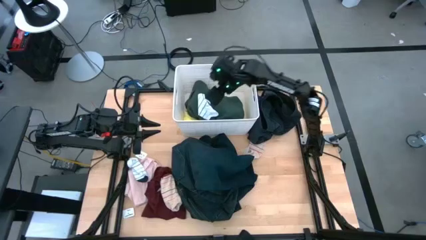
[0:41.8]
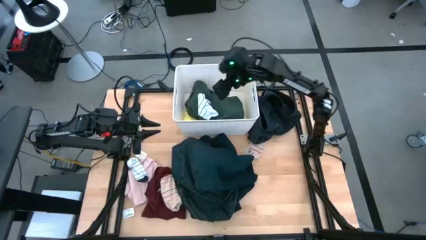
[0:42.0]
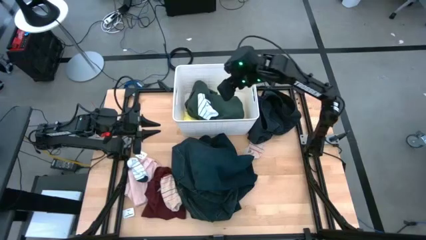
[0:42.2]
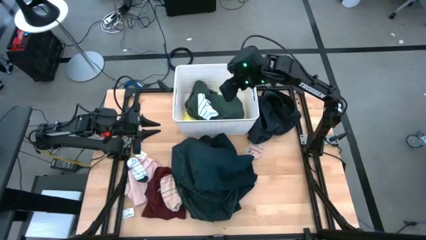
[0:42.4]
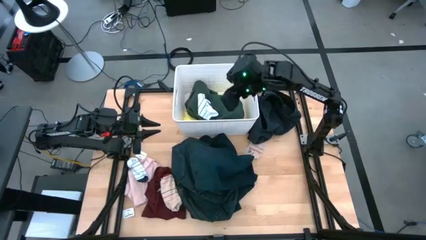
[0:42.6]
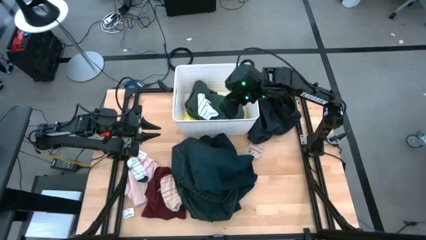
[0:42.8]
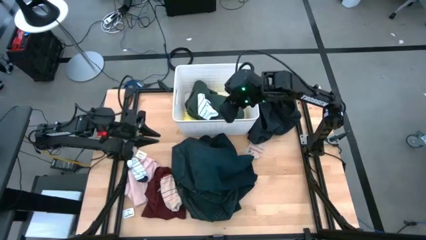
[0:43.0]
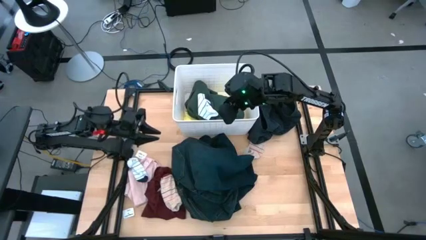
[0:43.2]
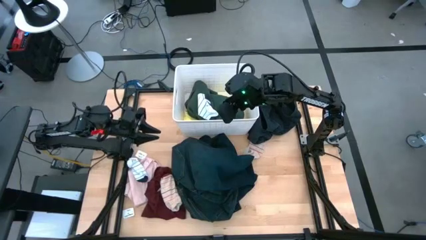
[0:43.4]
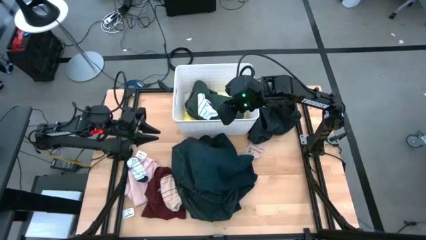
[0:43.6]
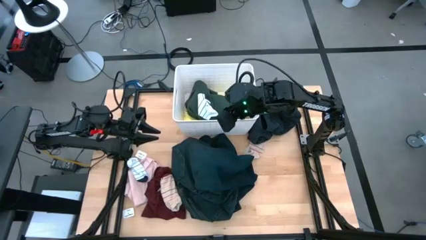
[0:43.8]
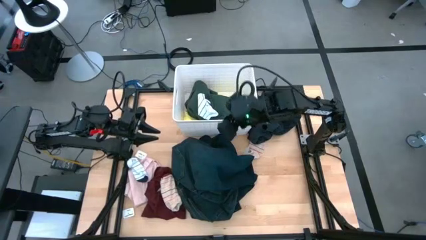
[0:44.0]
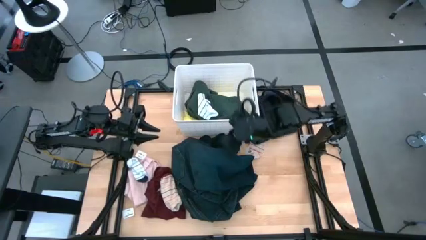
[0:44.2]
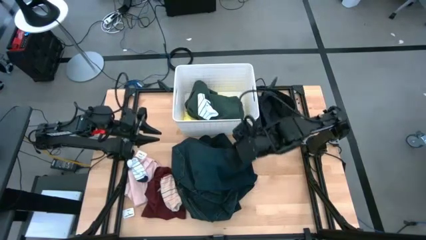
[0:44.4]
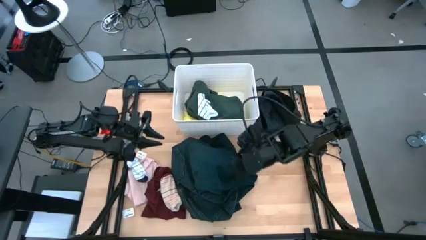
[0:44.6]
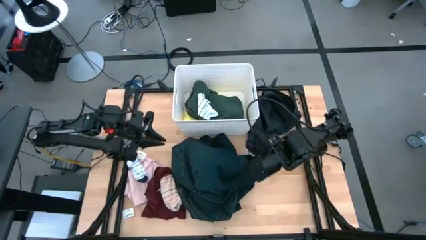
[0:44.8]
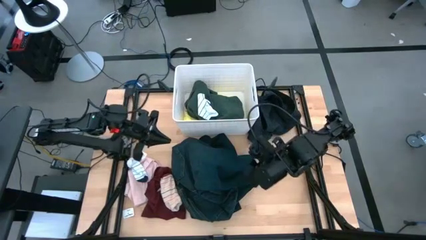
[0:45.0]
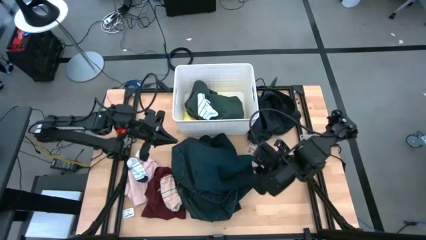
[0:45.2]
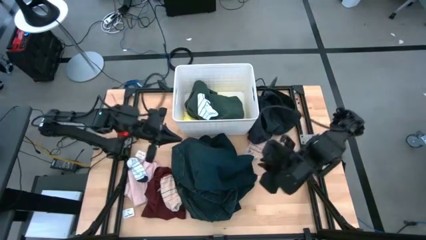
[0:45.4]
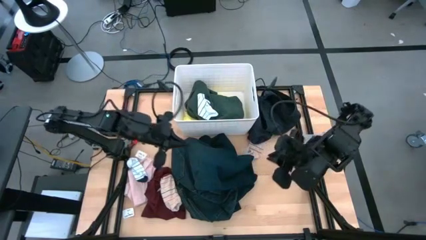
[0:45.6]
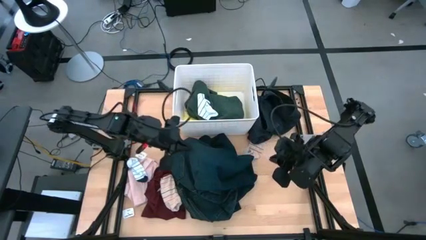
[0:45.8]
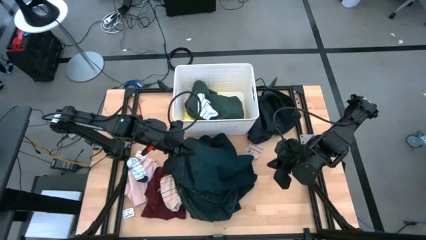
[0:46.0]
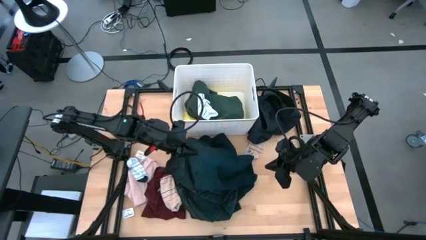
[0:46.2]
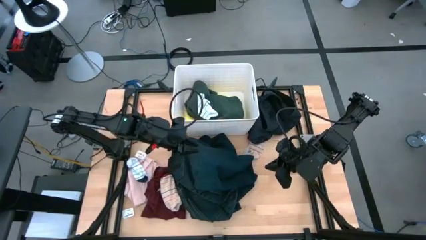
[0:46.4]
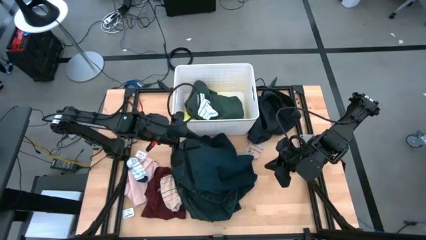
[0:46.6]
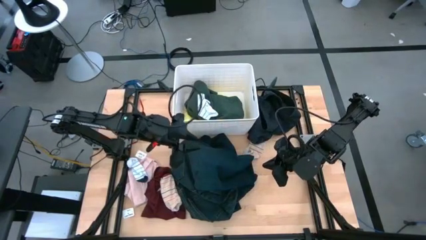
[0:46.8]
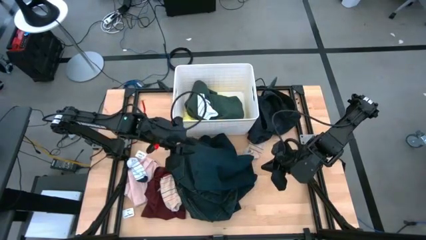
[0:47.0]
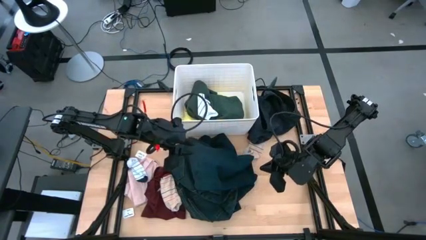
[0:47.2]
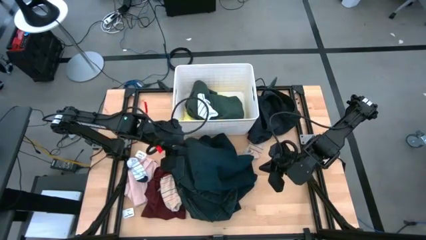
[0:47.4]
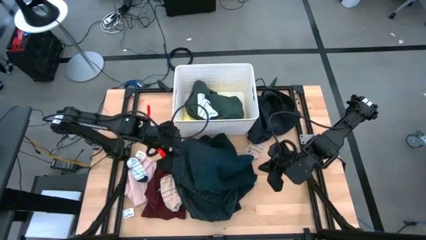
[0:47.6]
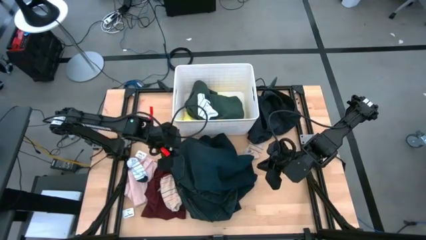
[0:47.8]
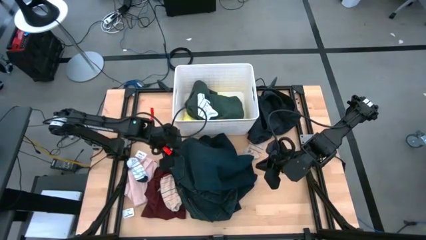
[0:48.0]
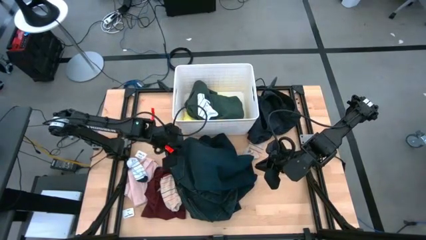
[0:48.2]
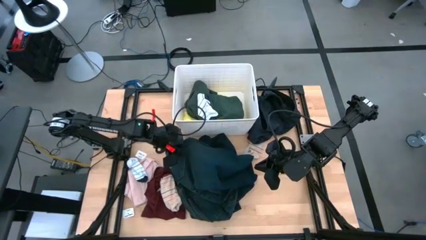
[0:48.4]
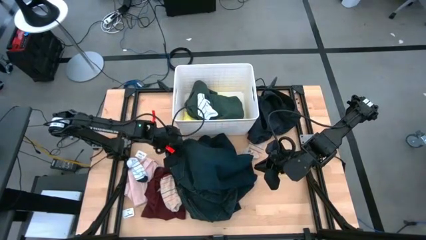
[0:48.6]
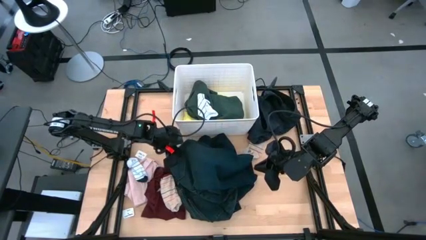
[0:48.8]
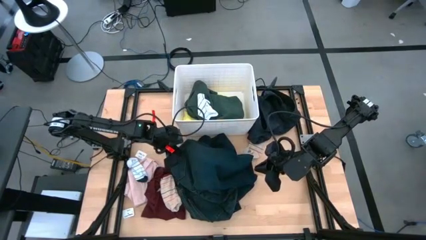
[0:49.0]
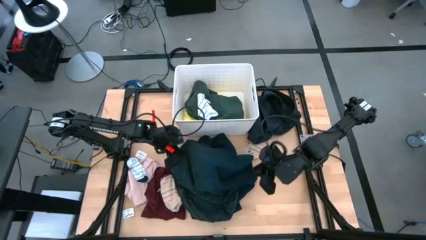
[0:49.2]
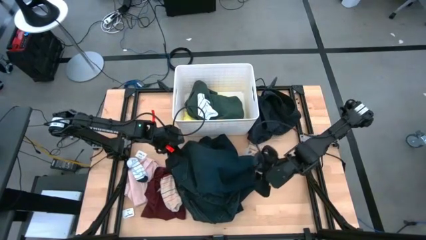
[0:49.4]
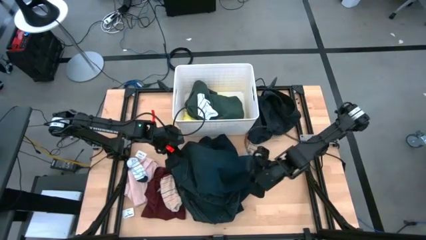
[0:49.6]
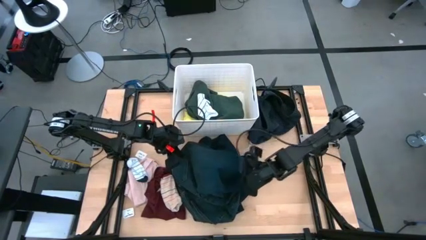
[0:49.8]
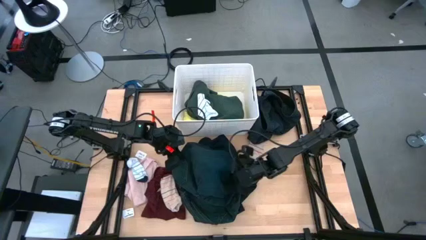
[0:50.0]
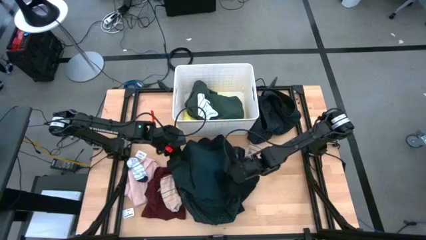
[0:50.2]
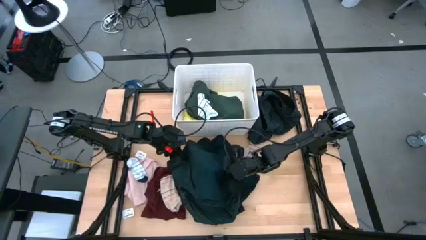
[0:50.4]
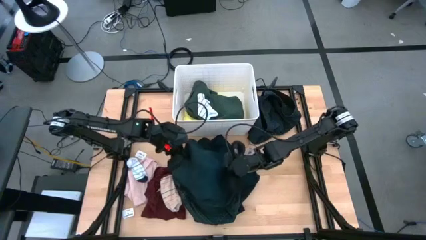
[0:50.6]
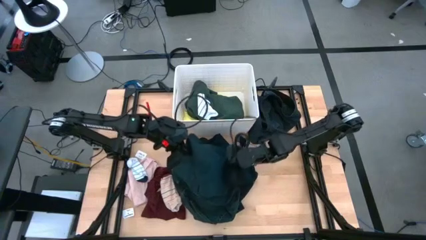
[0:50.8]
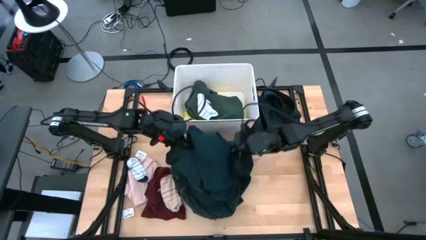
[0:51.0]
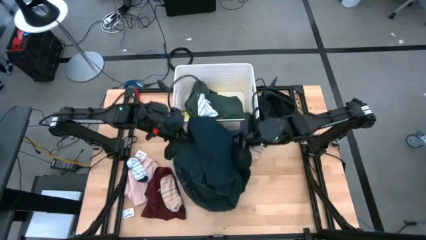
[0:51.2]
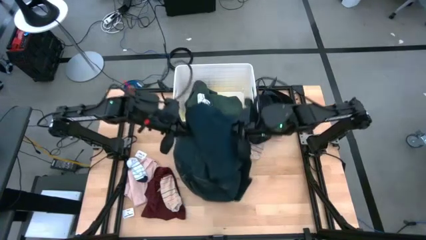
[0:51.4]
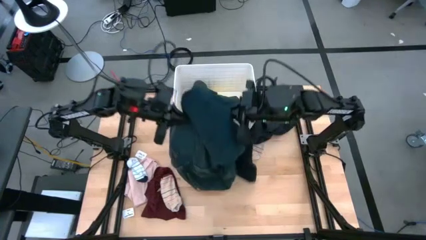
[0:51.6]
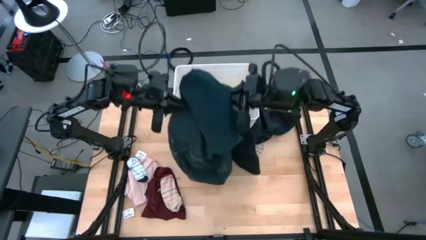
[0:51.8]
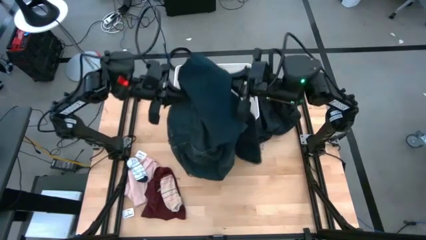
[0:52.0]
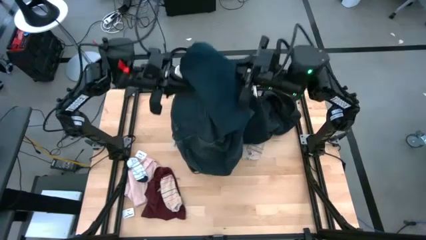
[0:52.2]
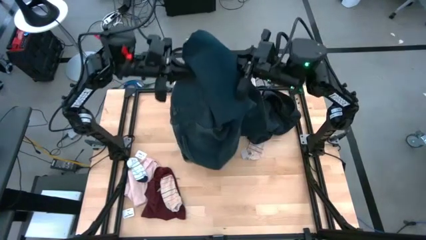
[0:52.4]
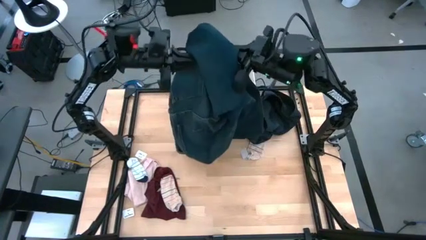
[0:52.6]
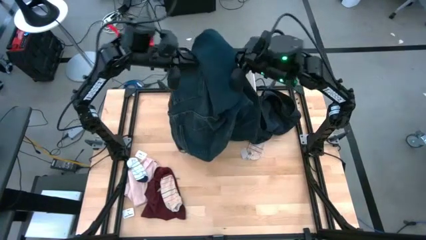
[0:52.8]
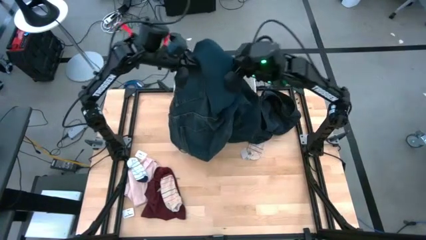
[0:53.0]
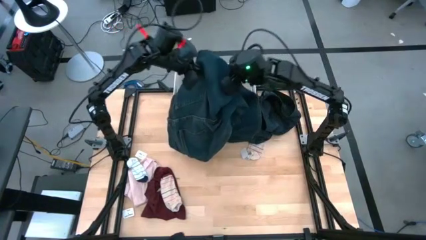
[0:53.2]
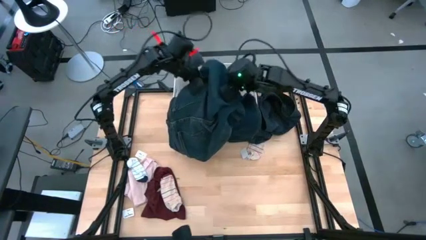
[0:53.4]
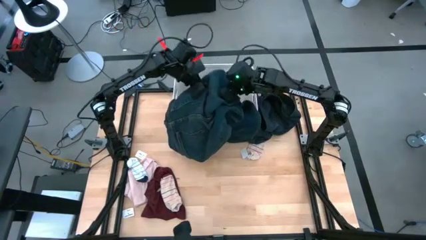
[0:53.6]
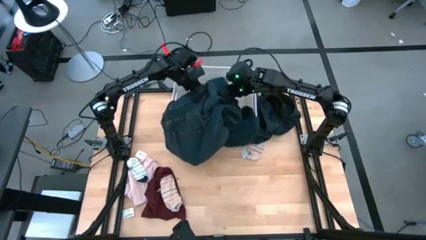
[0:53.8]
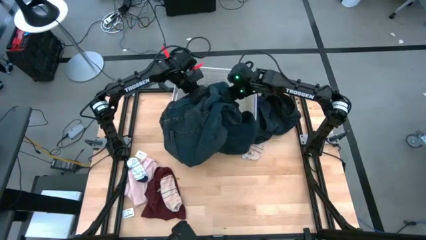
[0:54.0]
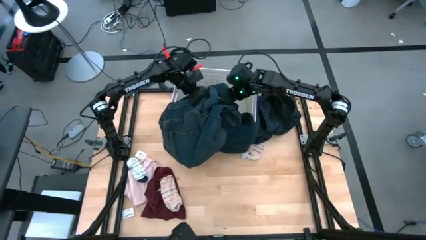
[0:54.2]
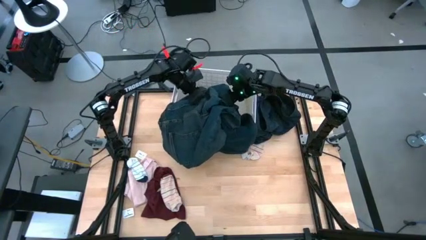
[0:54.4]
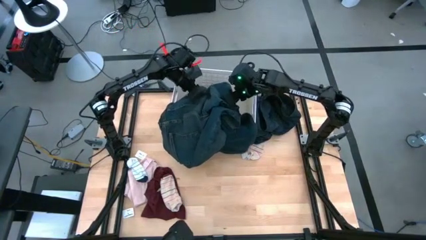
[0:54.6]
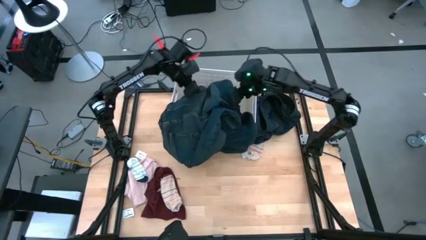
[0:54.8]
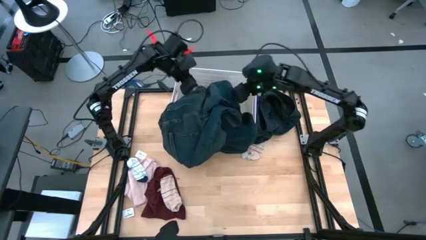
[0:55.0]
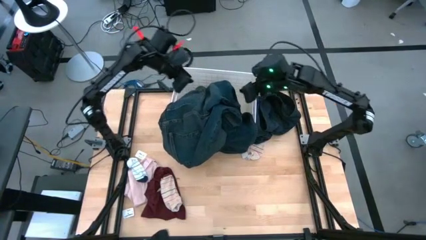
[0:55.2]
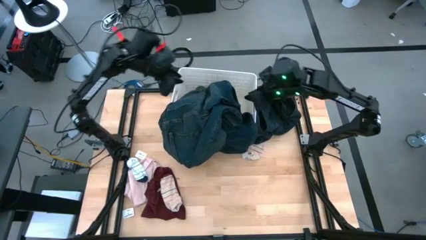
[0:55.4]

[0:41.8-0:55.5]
Task: Sort clothes
Put the dark blue pants into the white laundry bin

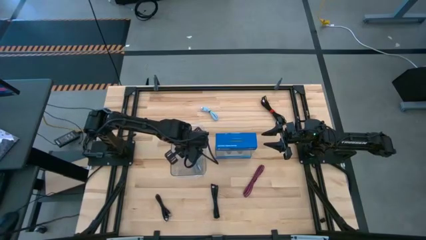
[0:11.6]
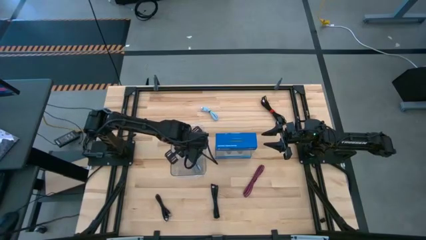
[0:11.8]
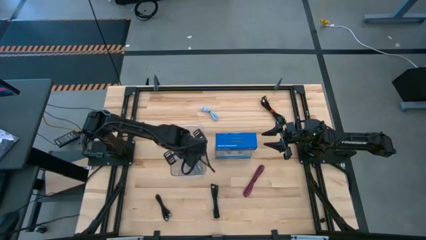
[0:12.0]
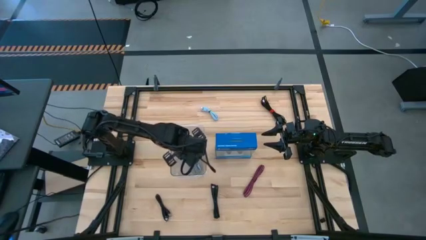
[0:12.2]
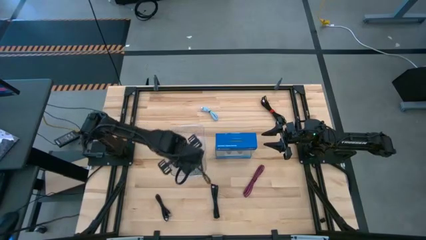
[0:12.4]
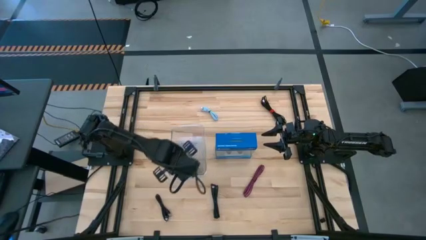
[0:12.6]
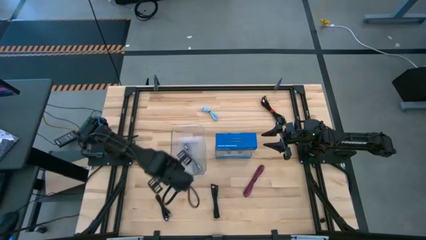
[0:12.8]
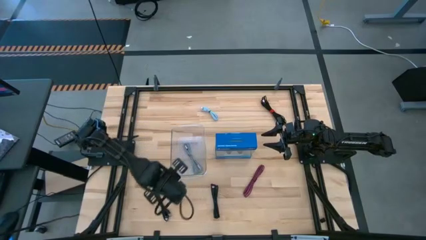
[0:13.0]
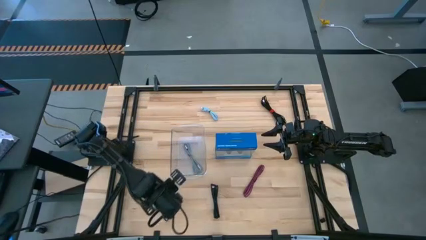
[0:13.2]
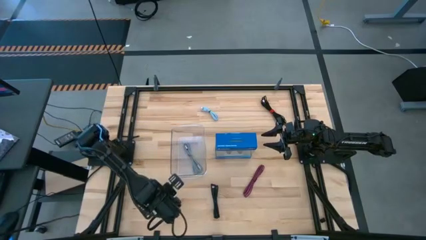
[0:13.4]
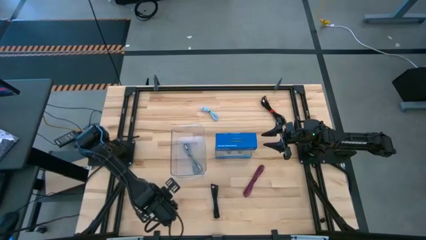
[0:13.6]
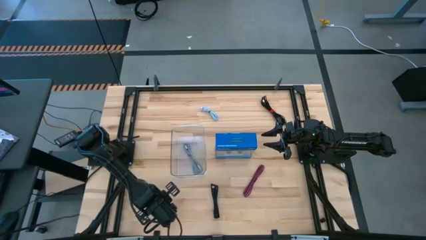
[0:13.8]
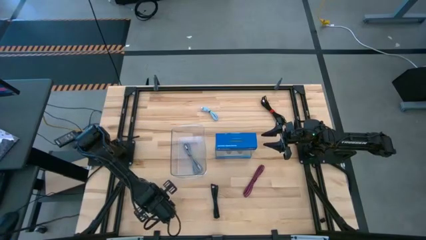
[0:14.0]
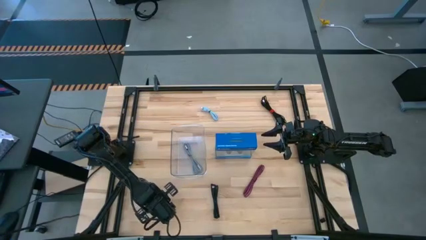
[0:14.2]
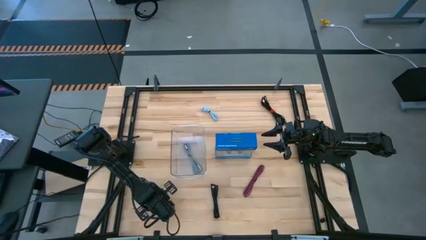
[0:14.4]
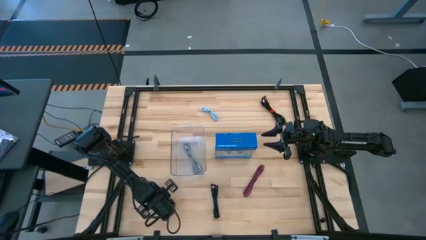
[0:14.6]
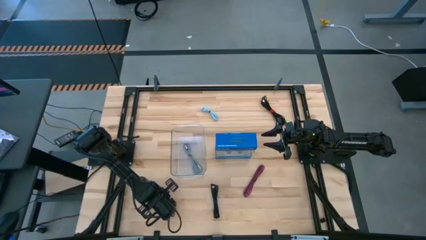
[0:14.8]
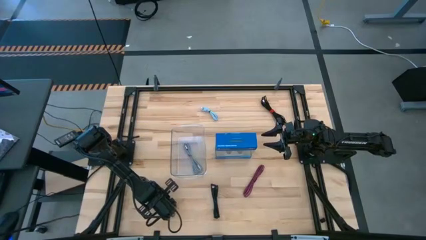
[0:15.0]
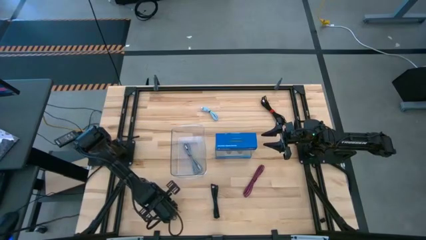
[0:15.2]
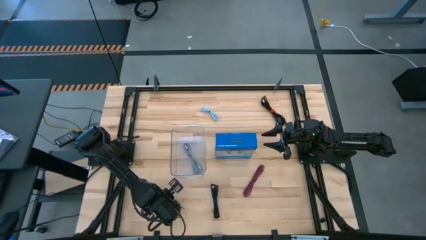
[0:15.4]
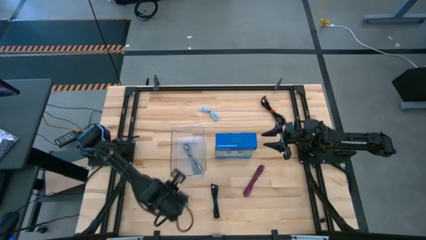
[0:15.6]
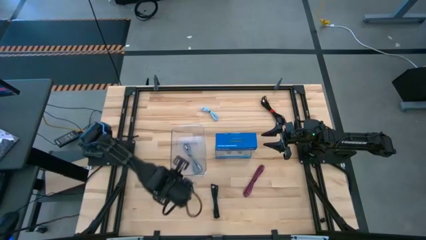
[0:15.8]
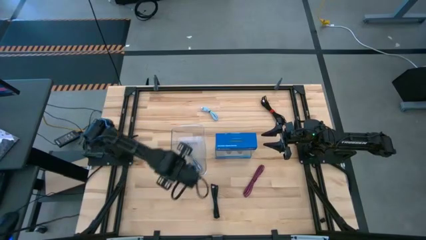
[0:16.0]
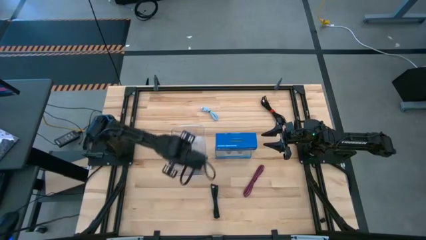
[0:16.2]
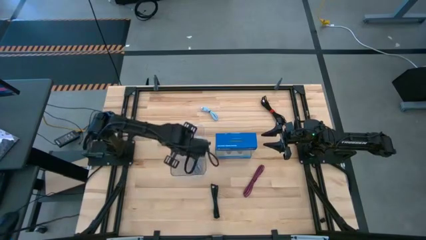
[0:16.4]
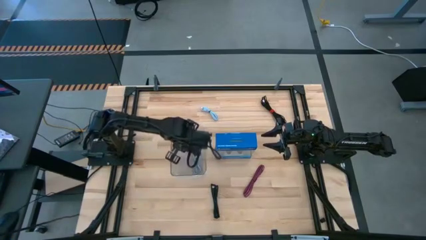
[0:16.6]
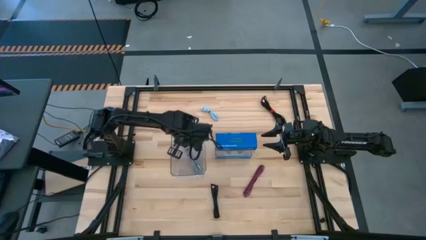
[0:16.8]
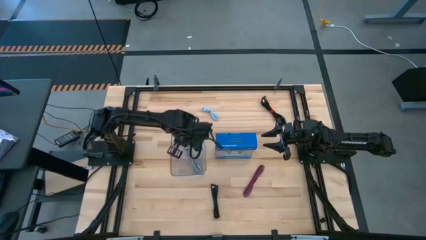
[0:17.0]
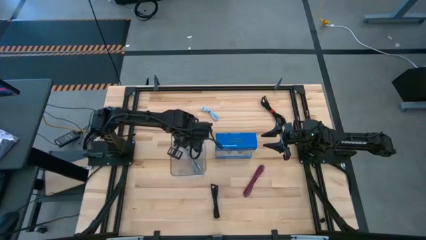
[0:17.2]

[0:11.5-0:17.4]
Task: Pick and place USB-C Cables
Put the bottom left black left charger cable into the transparent bin
